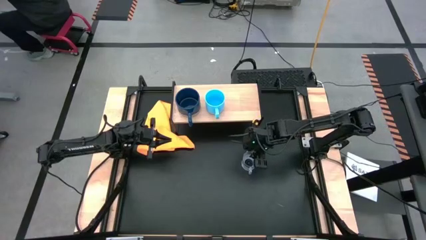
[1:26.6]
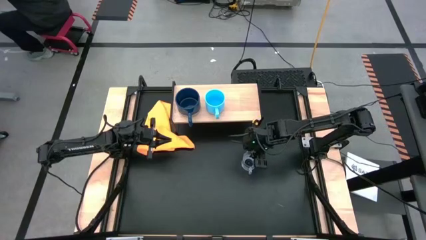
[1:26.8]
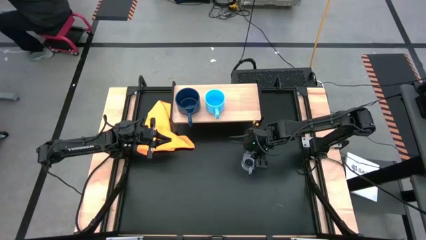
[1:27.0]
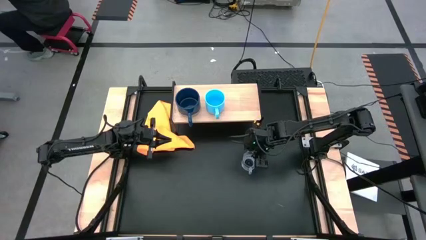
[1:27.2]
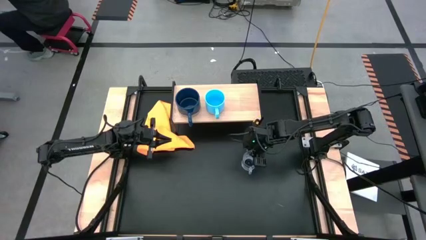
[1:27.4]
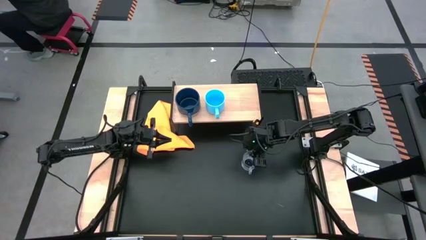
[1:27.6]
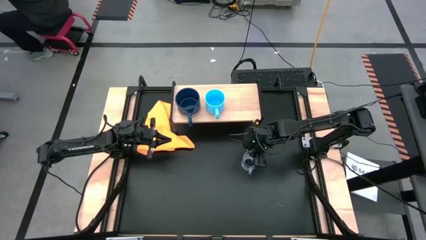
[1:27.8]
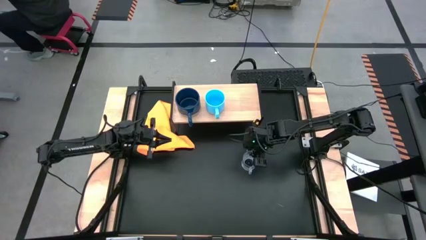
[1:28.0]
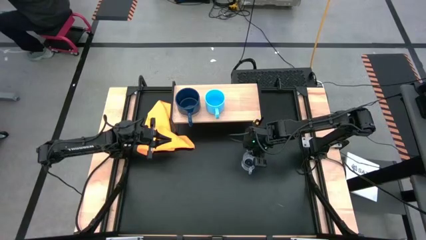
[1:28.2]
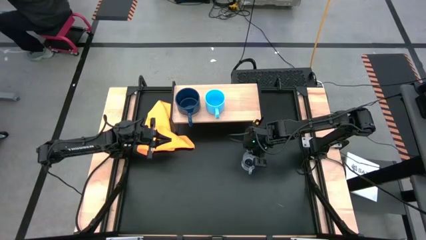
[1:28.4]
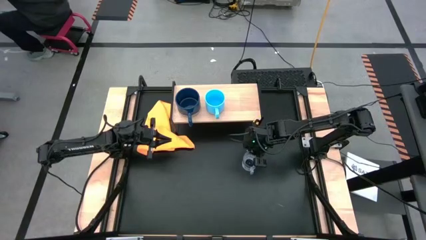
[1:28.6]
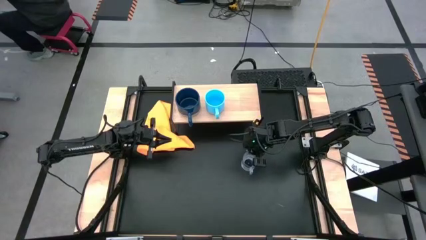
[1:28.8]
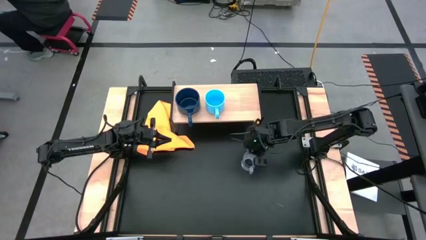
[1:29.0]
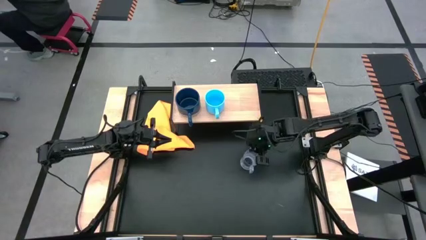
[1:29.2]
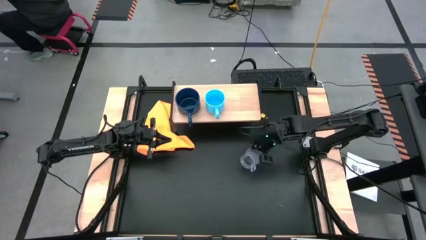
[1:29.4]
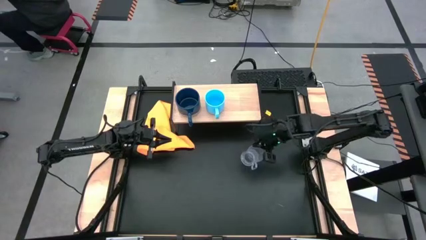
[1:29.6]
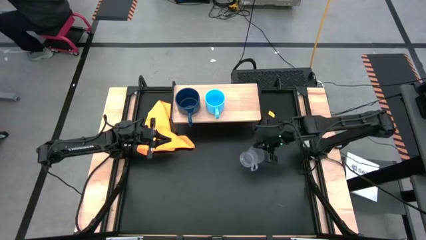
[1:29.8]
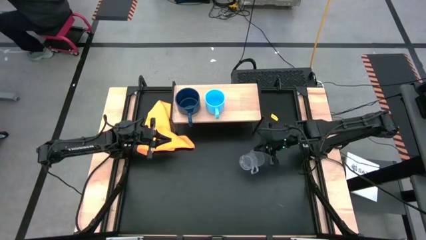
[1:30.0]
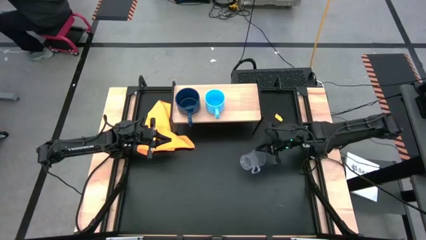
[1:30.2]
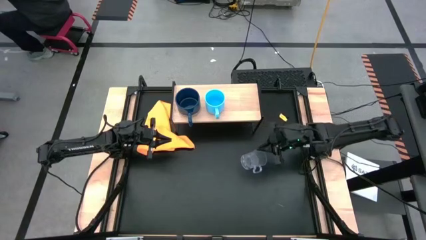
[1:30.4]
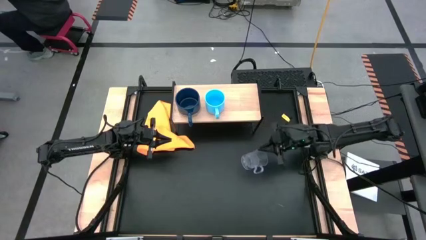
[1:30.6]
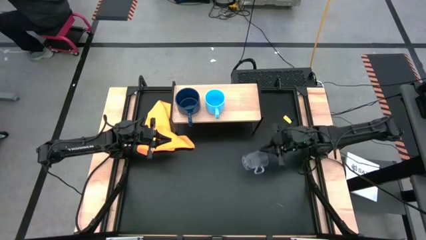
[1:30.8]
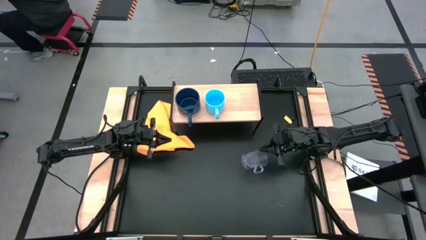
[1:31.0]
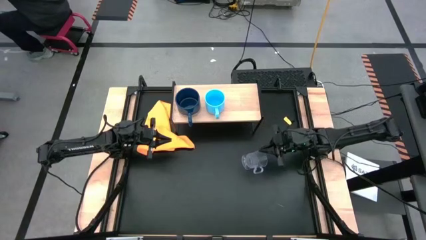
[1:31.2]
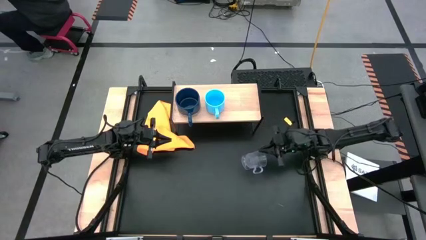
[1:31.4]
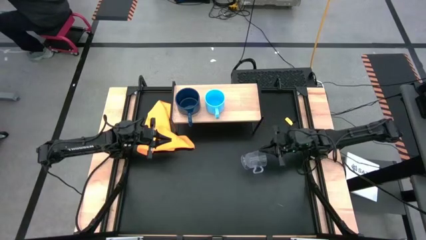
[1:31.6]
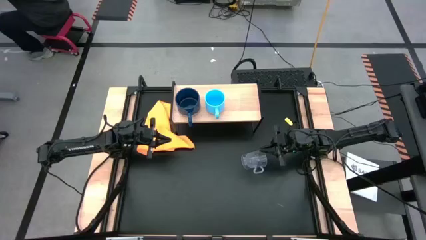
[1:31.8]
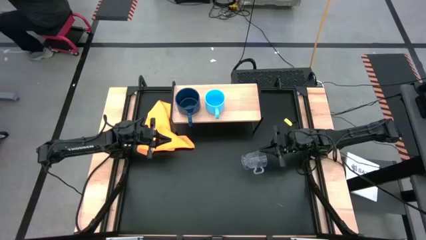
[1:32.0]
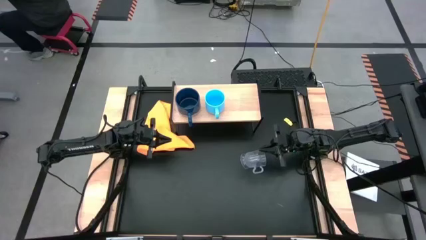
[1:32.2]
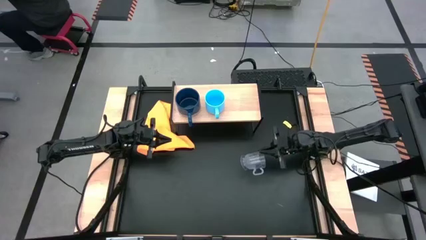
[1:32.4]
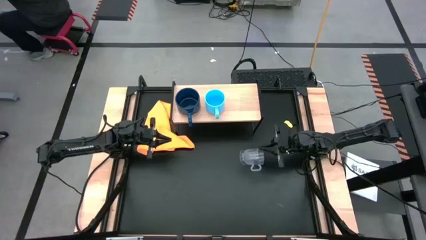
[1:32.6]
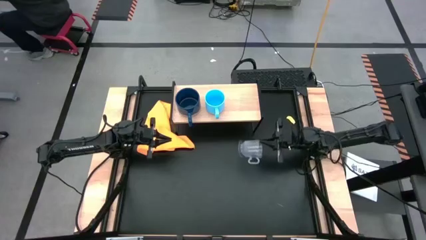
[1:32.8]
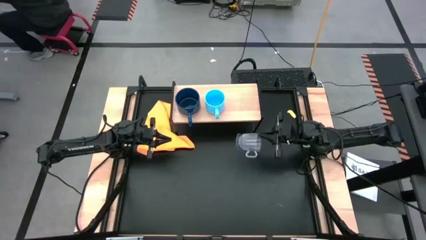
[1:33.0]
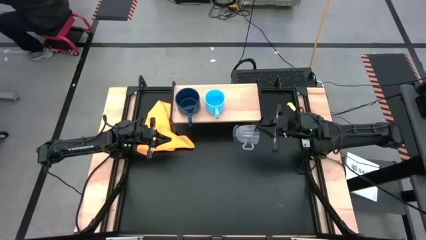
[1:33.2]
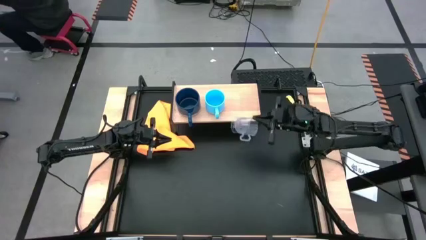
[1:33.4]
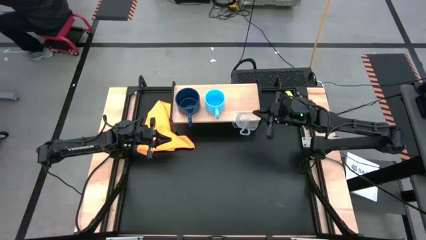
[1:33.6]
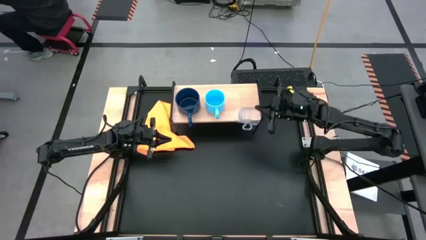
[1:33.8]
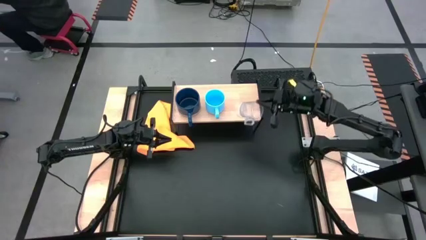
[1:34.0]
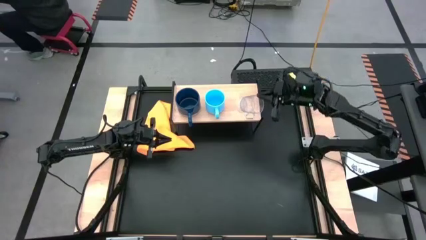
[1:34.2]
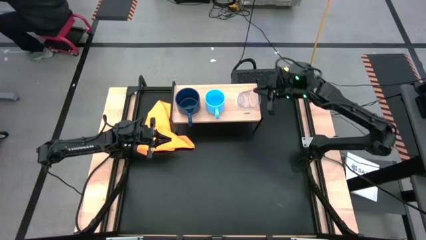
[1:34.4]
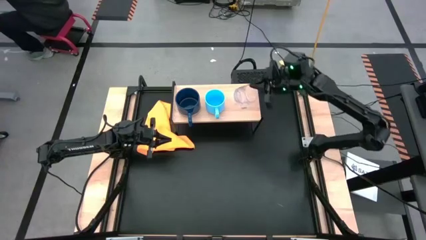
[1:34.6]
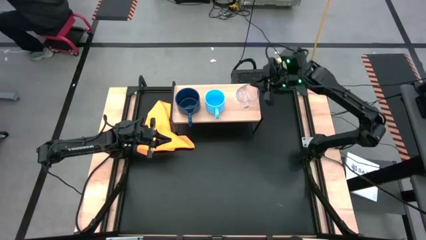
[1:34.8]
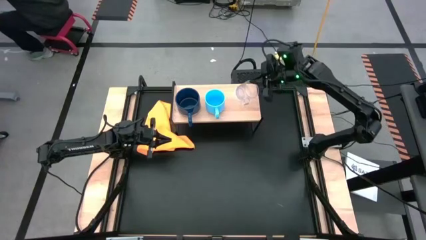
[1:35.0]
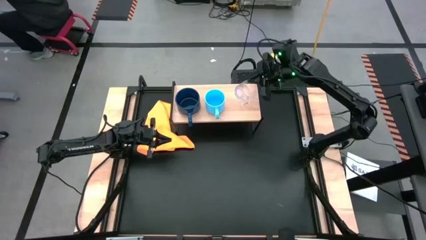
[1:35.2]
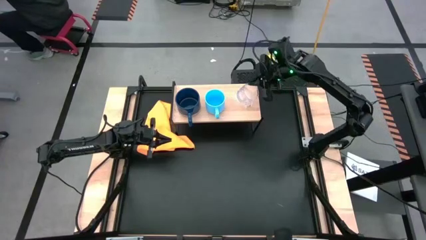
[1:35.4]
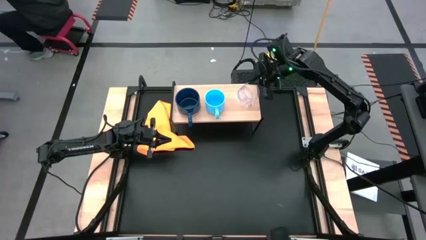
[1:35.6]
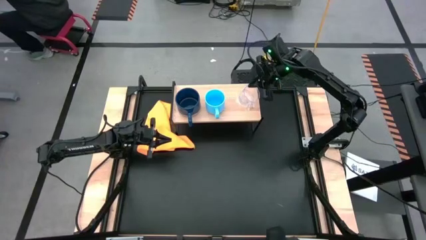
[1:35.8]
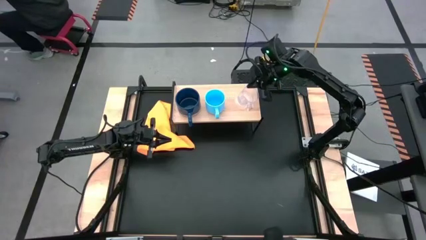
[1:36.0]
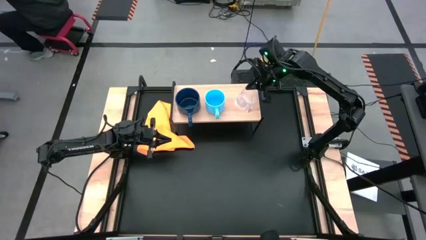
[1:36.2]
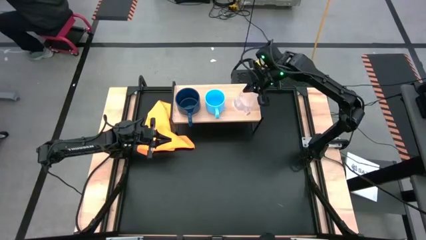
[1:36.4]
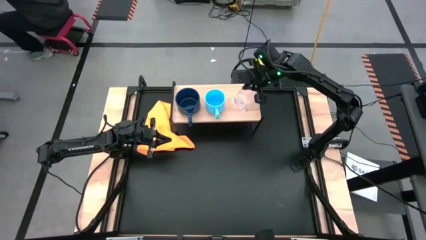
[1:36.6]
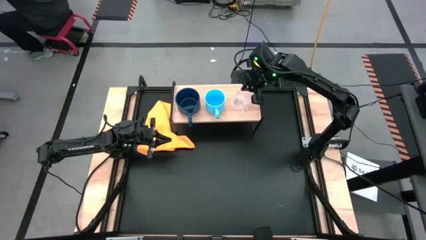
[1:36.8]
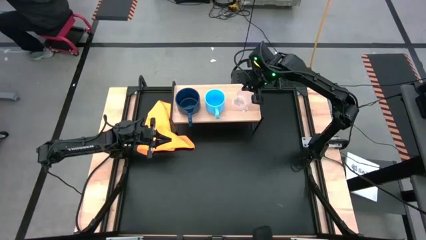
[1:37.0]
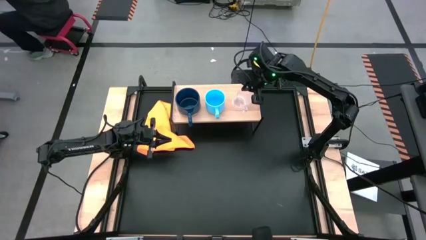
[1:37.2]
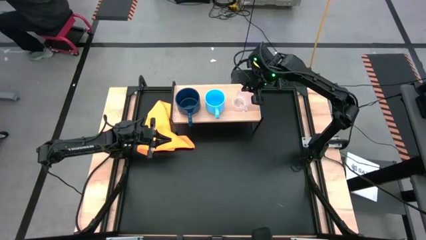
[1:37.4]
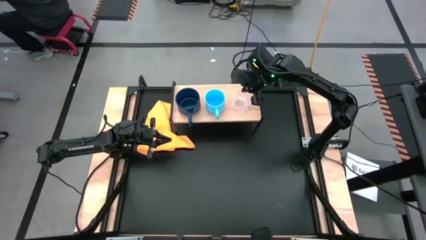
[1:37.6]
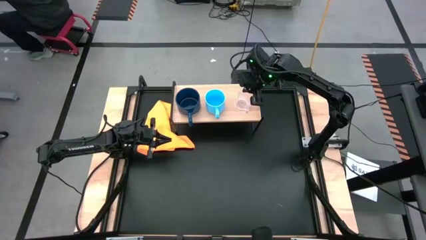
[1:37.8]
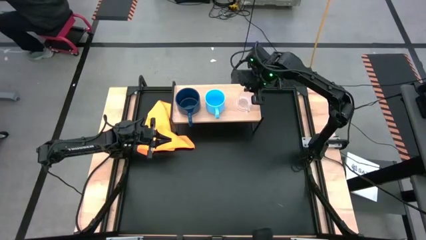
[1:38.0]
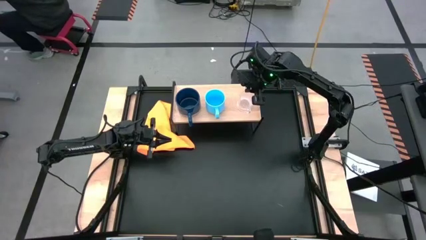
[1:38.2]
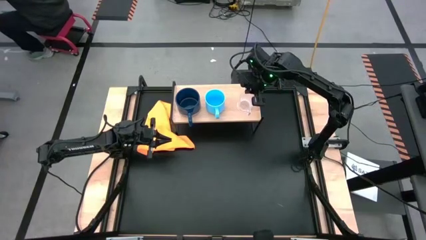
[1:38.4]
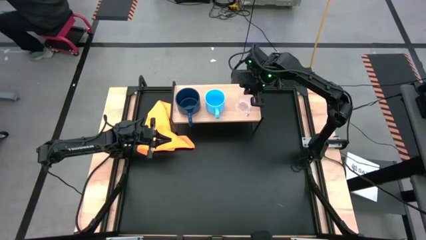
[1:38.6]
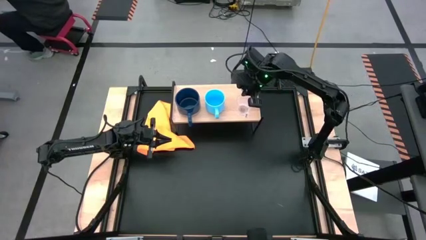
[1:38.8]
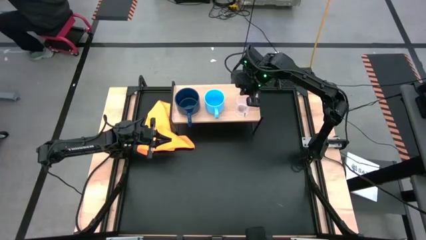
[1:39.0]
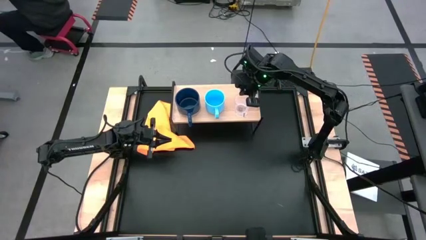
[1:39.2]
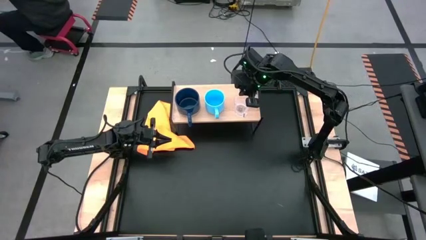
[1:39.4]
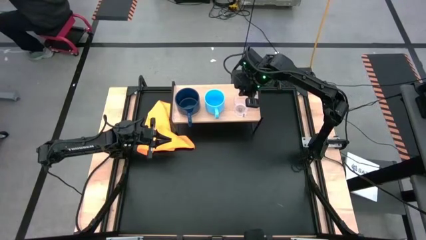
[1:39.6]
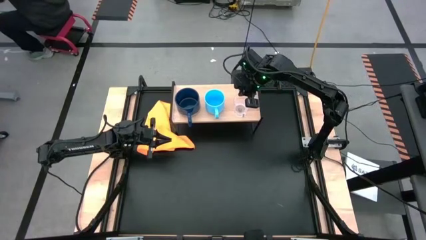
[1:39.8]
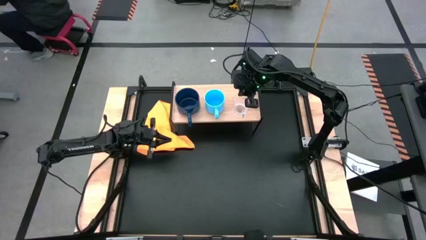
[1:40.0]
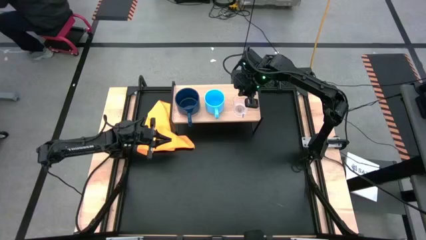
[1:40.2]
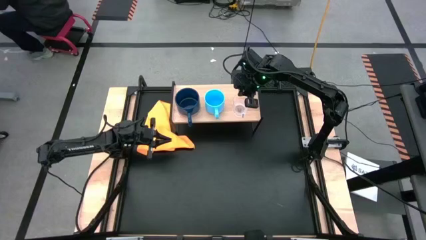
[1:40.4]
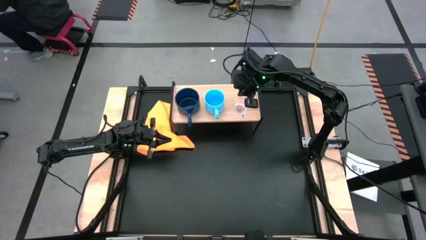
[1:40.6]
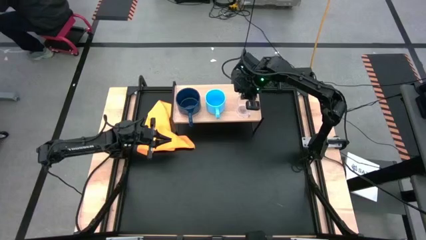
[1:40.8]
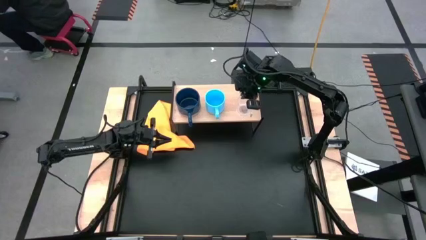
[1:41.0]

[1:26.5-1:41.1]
Task: Stack small to large cups/mugs on shelf
Put the transparent mug on the shelf
